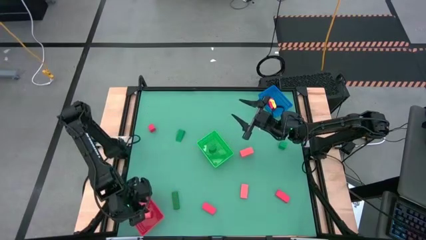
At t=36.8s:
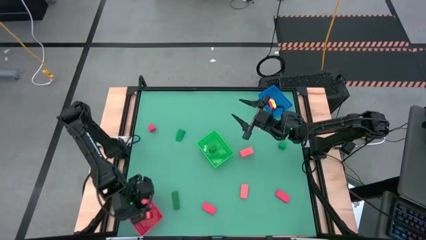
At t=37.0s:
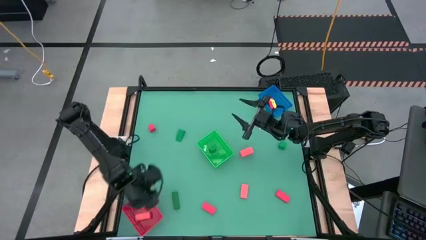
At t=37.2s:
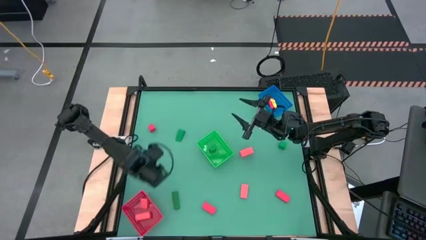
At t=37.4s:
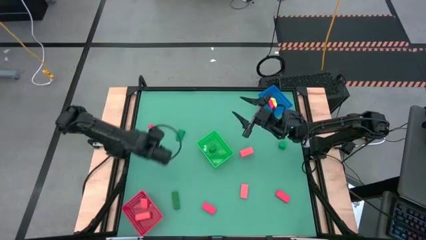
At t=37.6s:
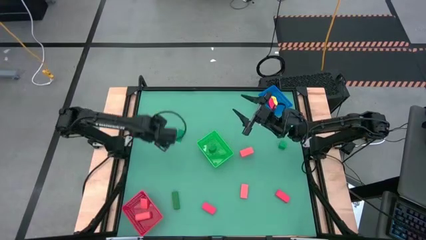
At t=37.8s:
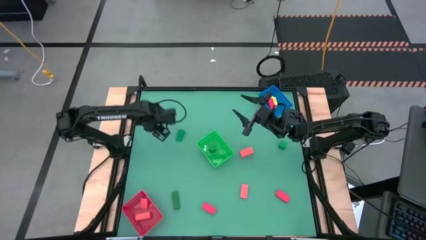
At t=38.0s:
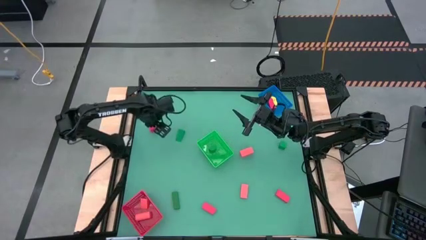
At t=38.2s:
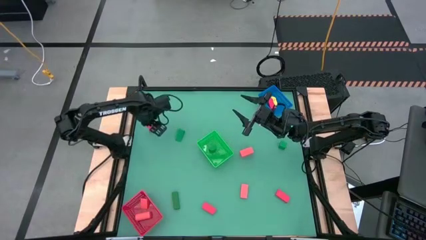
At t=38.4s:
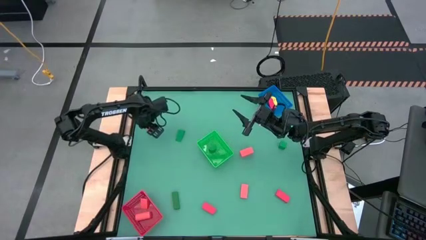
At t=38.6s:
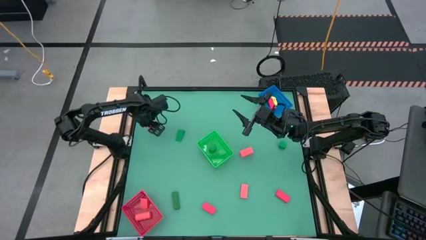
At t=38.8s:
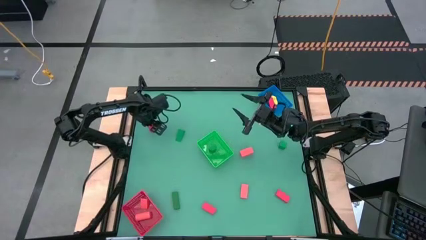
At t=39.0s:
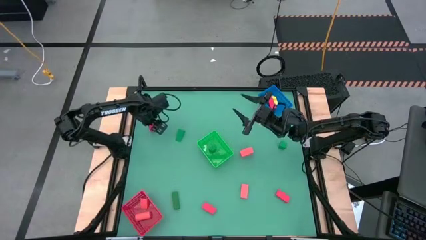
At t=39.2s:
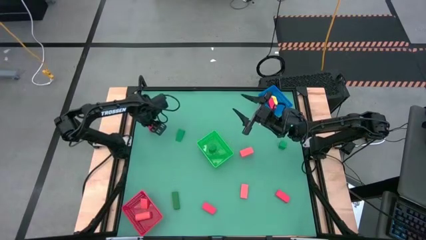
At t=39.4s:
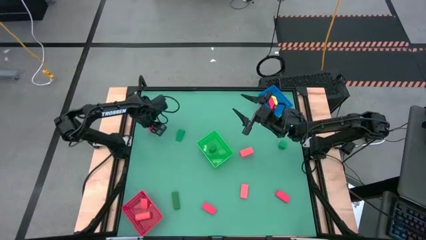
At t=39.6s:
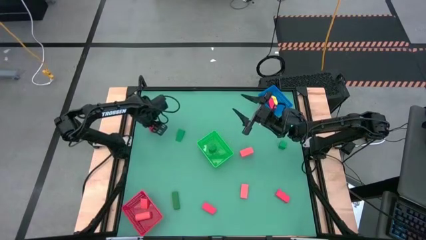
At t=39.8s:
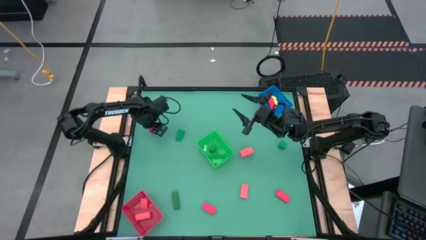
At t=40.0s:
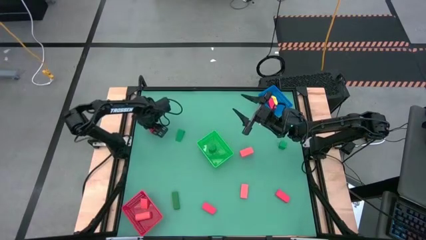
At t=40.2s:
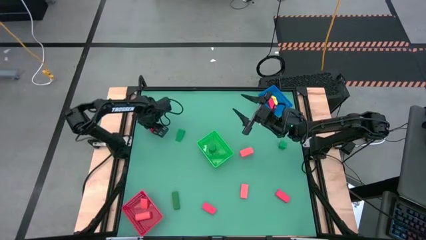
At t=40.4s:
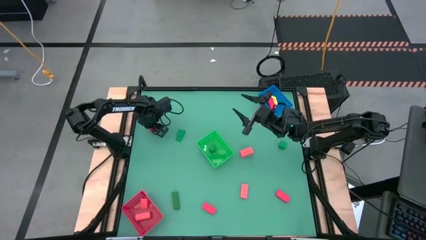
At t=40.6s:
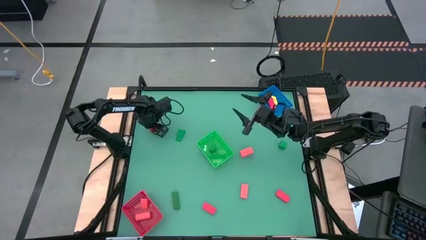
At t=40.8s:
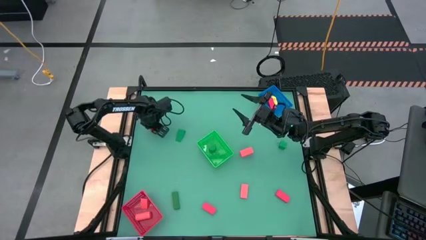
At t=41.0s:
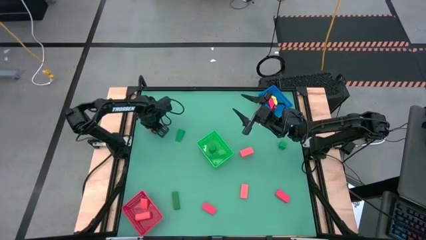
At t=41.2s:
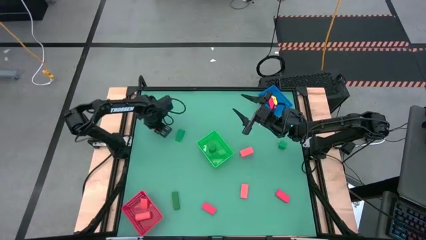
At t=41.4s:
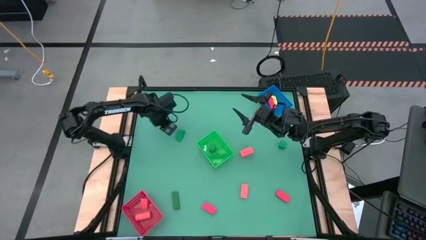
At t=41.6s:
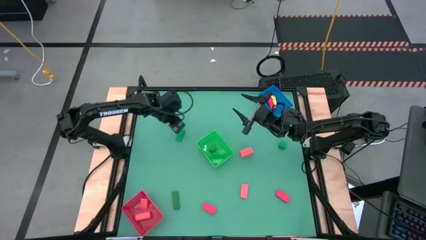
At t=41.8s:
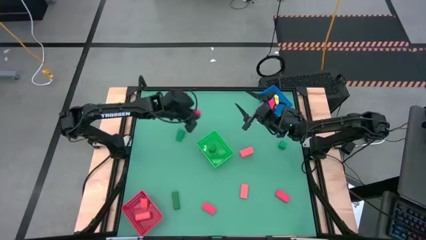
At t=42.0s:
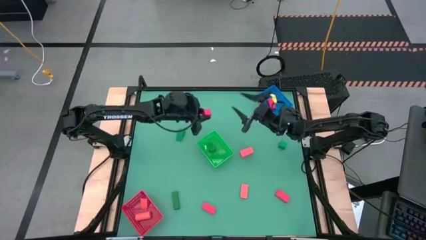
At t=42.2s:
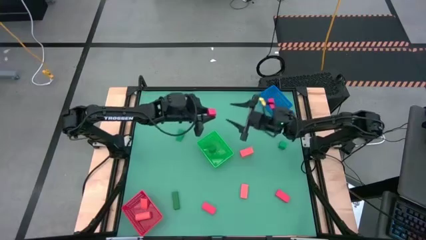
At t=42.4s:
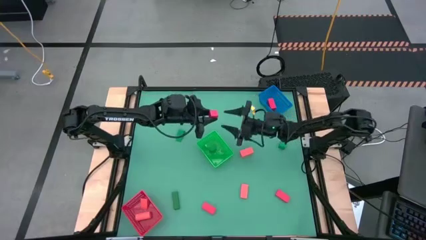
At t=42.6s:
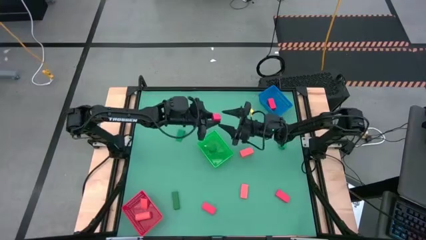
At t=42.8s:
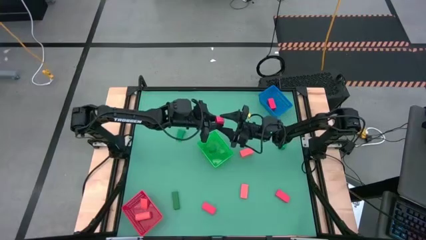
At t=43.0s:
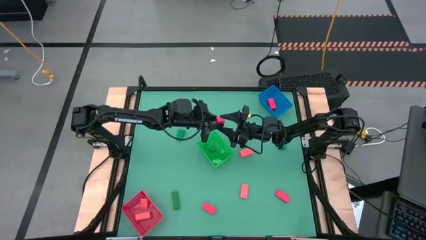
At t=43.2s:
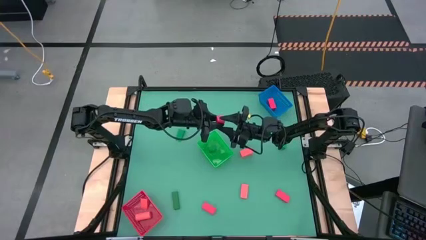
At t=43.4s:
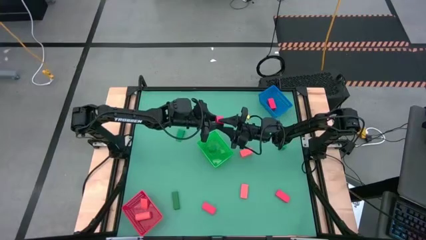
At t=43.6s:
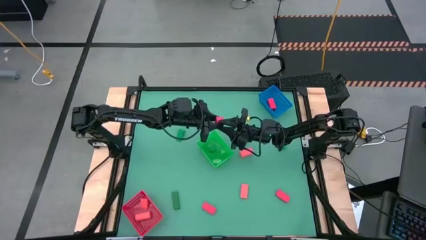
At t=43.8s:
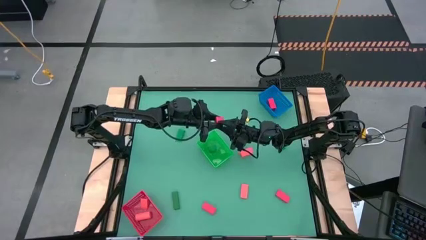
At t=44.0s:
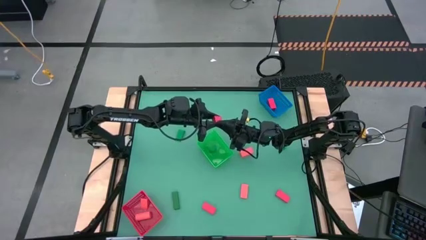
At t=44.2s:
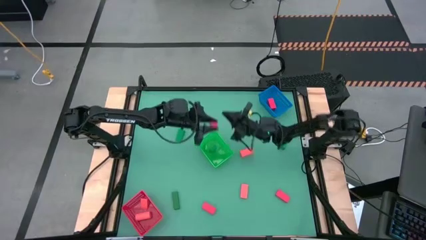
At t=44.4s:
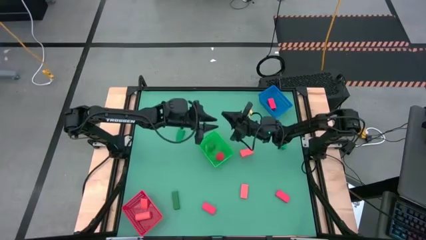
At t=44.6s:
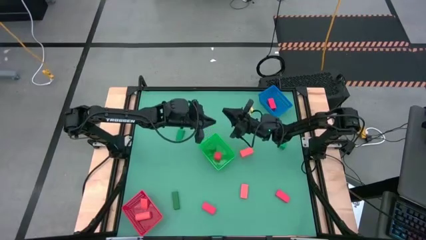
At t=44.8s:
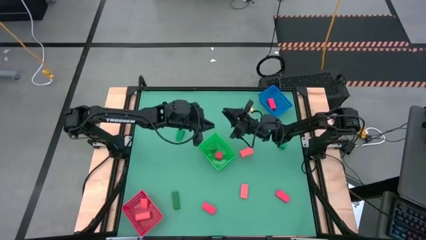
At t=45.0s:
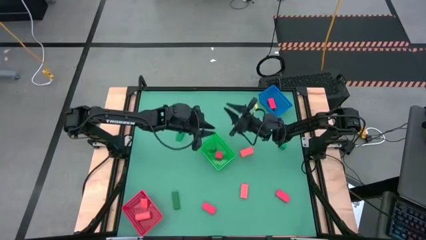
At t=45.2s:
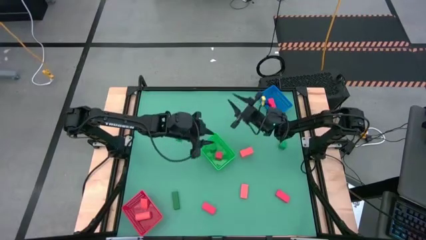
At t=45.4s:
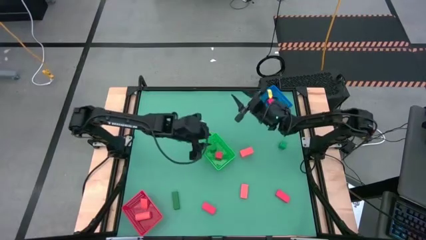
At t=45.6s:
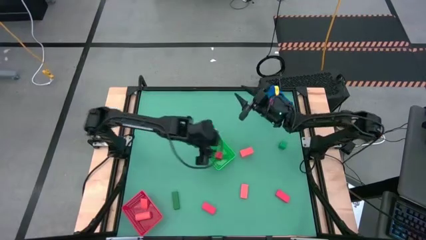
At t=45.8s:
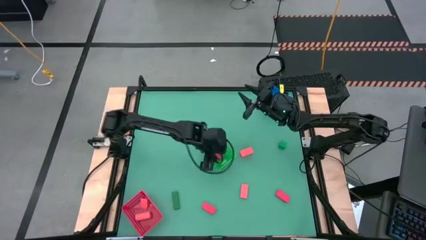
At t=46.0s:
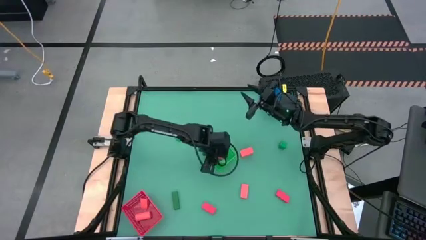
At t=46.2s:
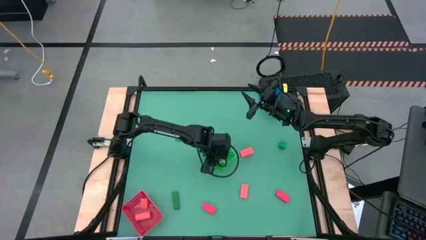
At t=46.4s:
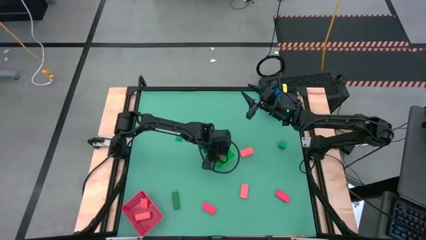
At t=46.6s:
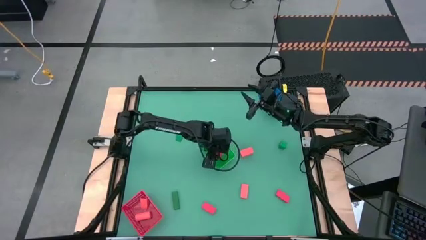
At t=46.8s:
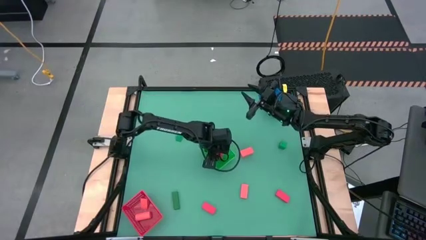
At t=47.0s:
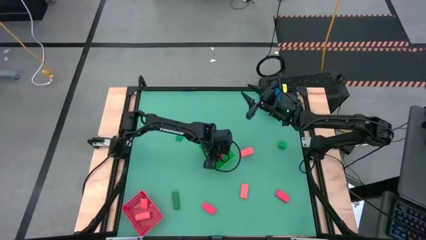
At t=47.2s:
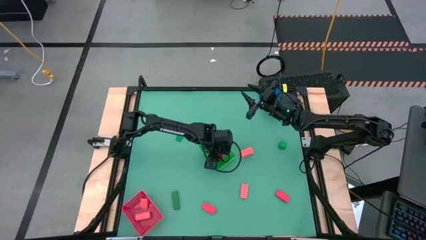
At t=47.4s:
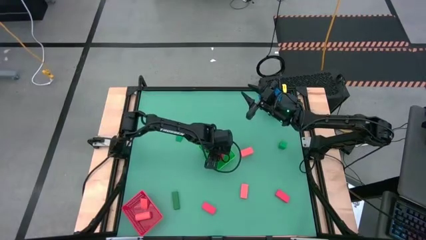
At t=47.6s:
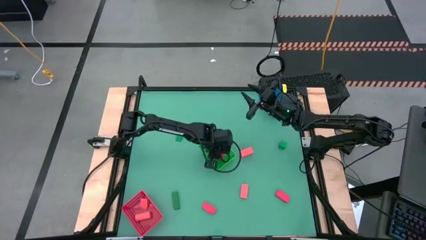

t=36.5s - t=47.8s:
Task: Sort & place blocks by color
Put the light pink block into the blue bin

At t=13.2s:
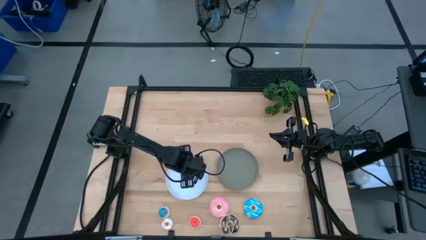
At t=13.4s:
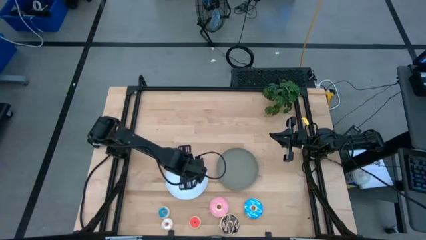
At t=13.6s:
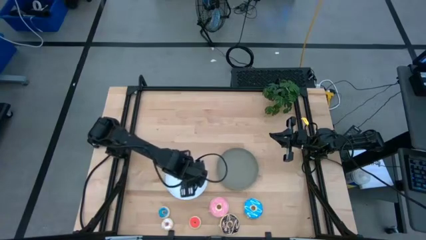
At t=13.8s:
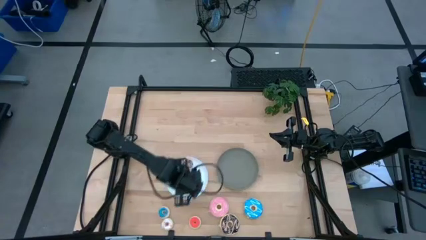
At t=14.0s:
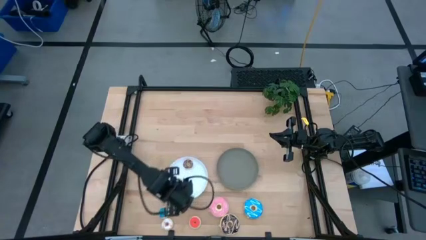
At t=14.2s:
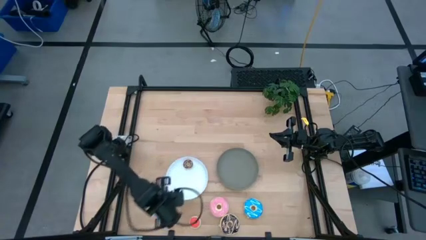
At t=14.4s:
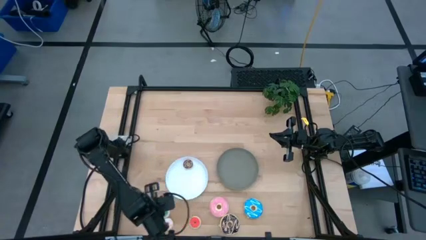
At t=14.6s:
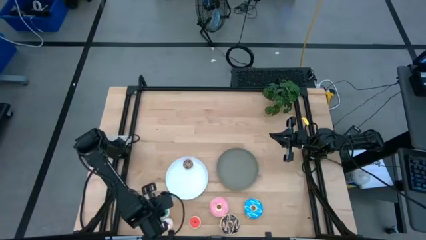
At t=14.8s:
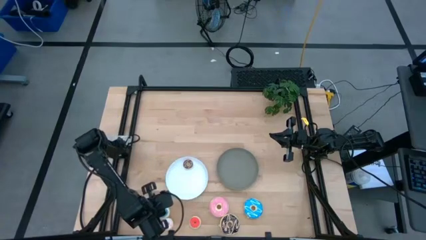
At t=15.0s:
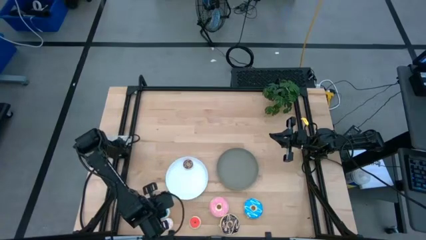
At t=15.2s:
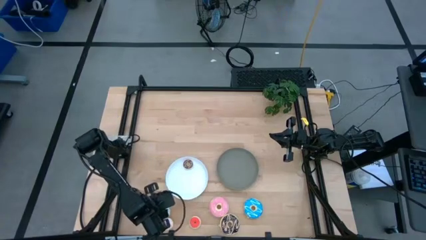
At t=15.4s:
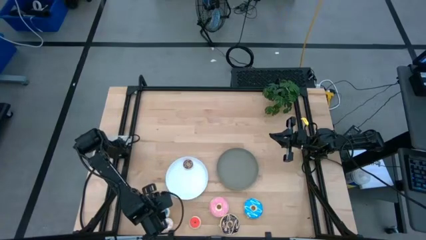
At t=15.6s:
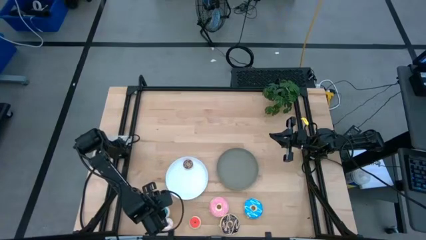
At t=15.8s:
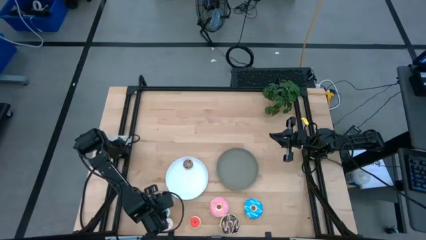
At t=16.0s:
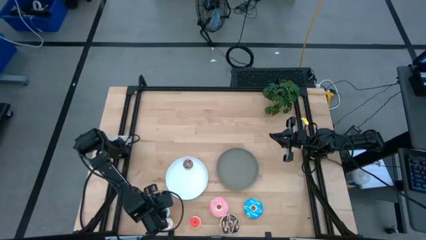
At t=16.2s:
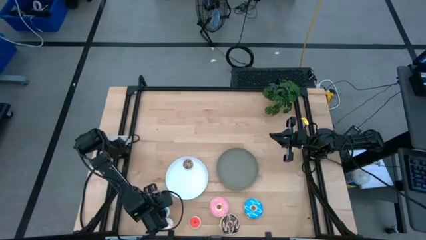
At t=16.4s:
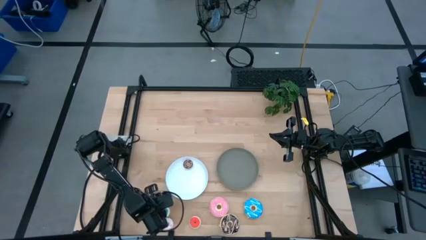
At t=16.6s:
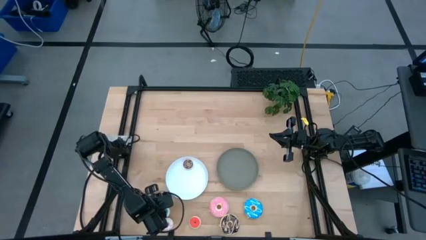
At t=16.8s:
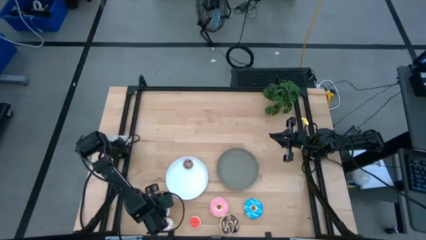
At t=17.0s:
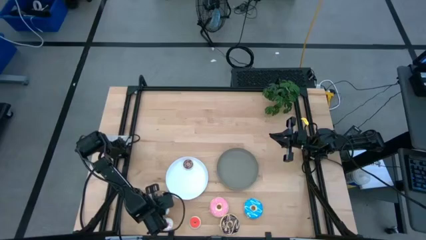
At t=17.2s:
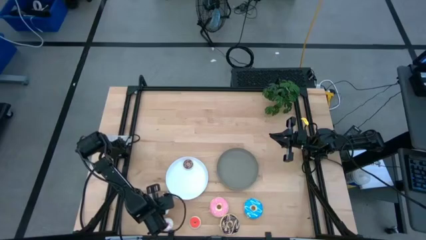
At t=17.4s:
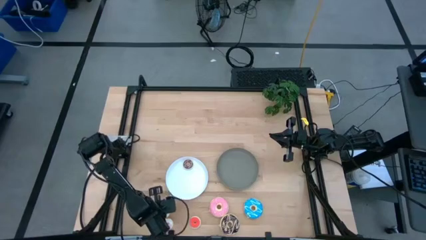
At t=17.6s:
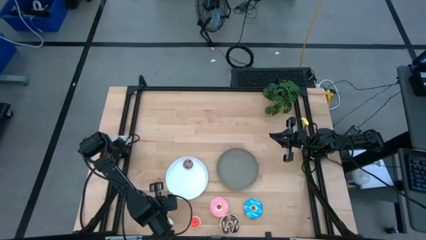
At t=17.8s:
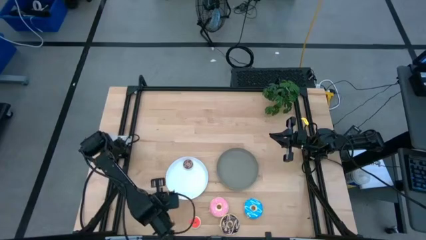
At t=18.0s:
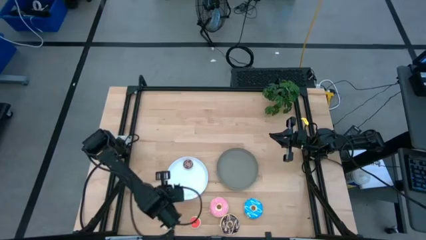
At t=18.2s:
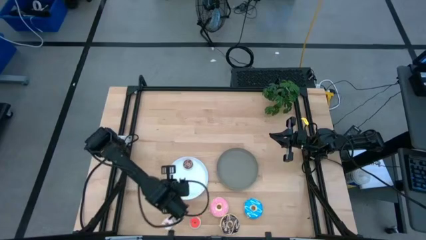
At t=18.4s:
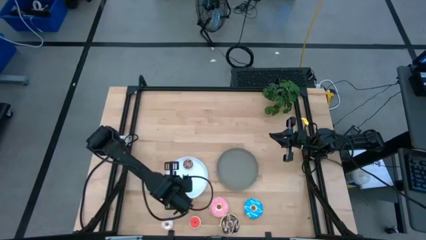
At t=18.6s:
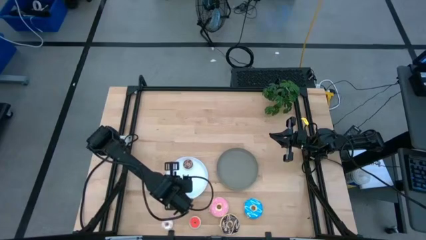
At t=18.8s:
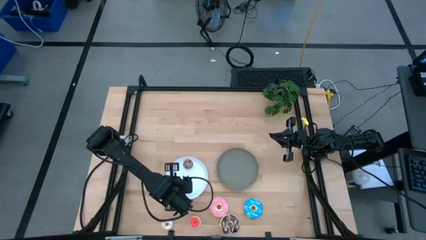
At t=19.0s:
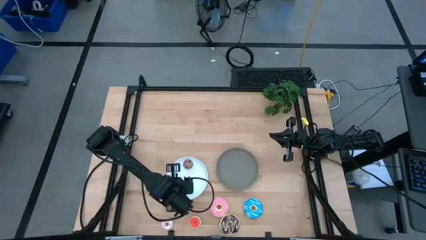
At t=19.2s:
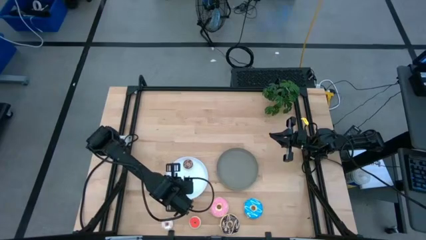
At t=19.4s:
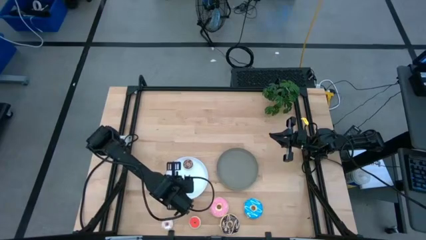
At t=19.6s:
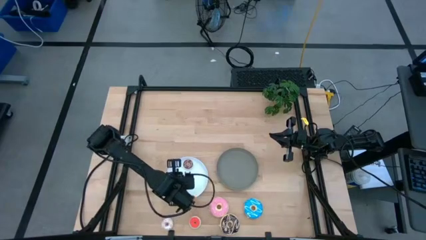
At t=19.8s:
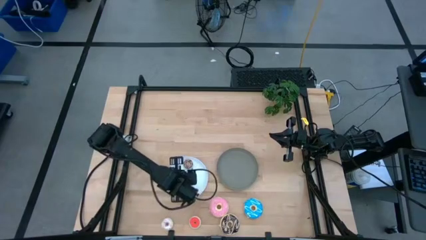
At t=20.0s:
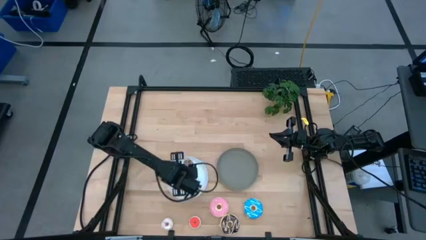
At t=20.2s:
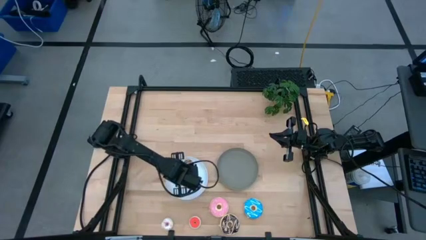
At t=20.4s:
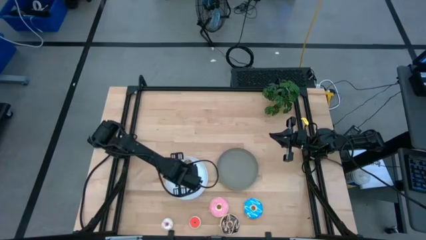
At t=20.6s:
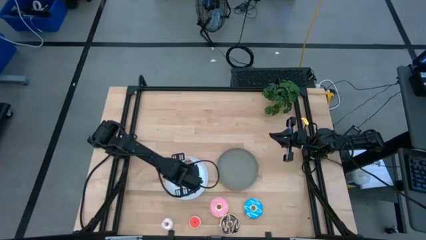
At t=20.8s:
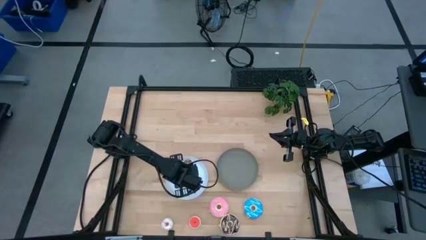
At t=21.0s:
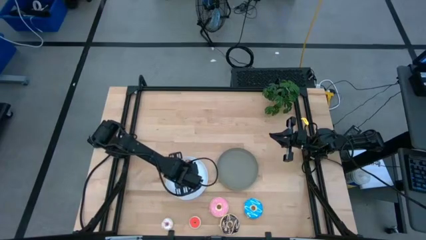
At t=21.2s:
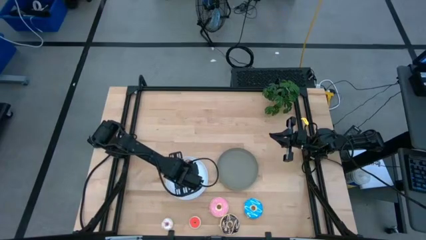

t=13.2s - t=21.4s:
Task: Pick & Place donuts
Put the small blue donut on the white plate
